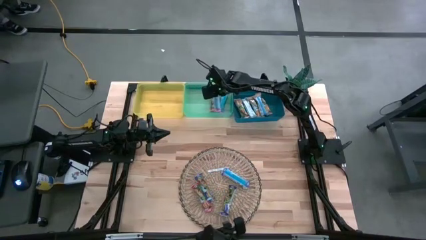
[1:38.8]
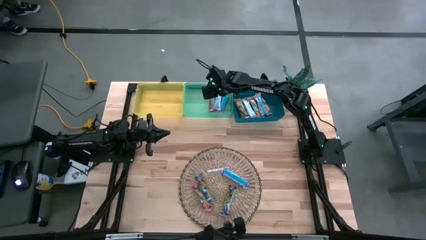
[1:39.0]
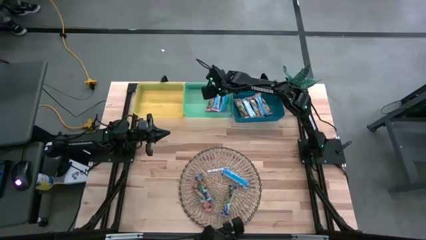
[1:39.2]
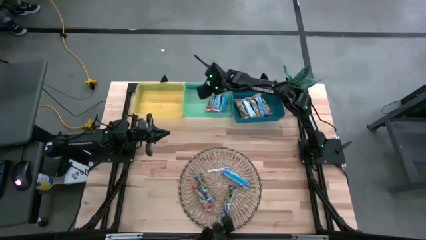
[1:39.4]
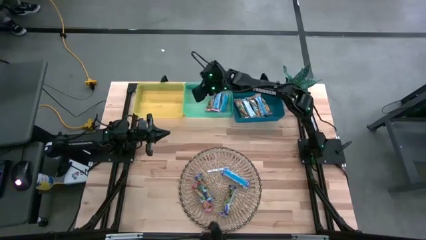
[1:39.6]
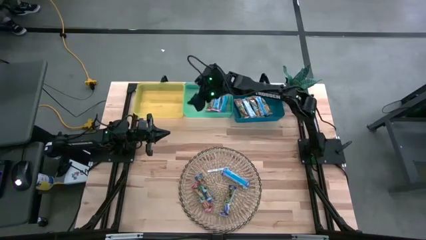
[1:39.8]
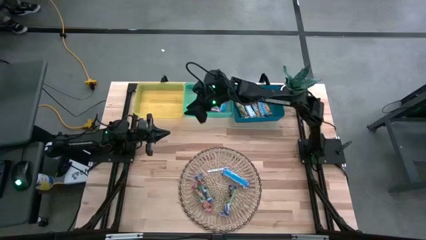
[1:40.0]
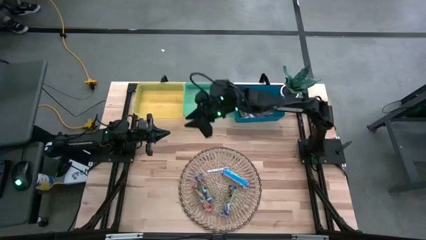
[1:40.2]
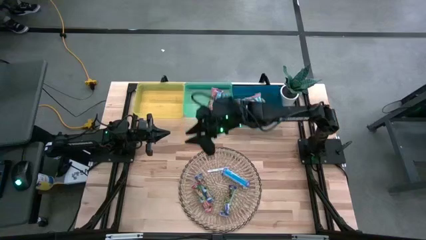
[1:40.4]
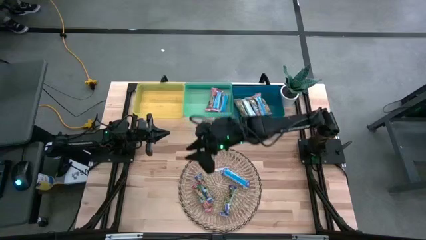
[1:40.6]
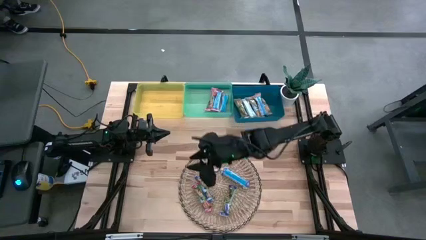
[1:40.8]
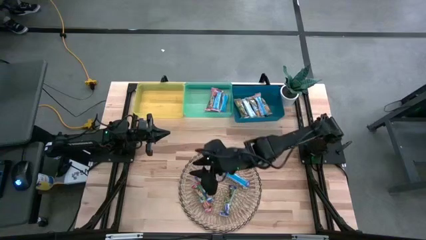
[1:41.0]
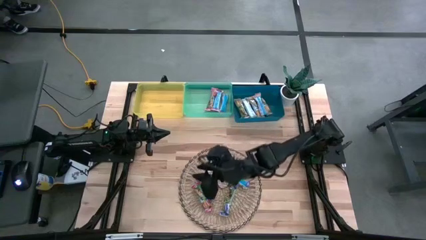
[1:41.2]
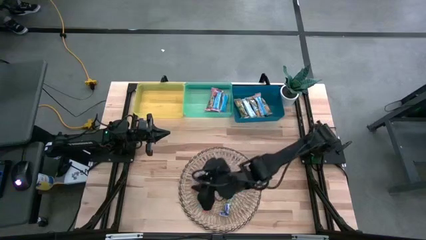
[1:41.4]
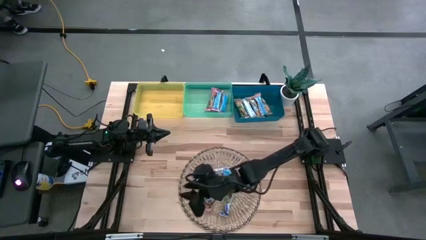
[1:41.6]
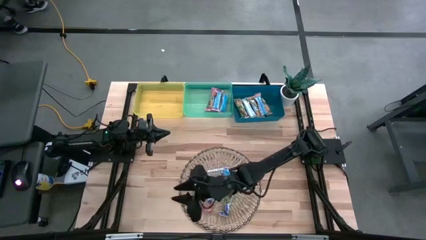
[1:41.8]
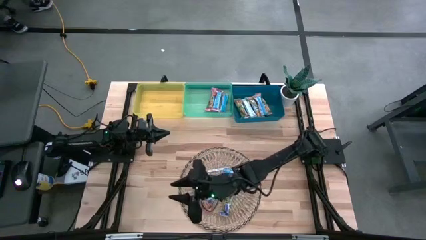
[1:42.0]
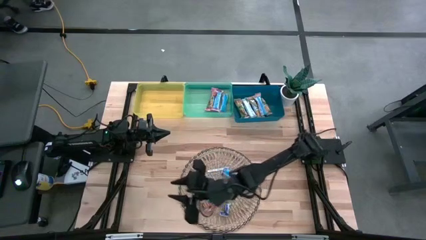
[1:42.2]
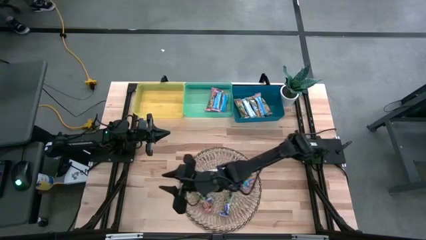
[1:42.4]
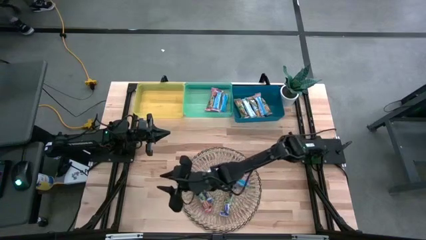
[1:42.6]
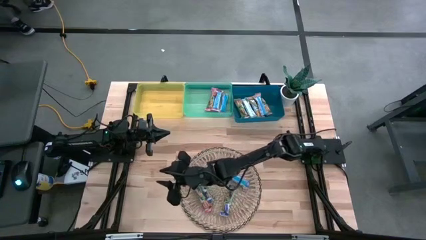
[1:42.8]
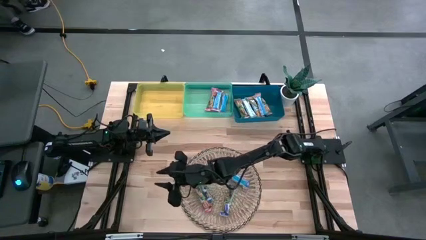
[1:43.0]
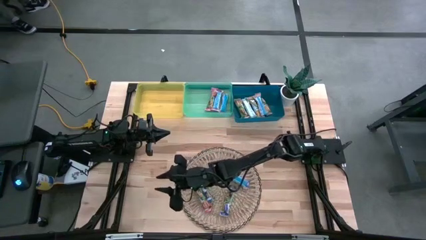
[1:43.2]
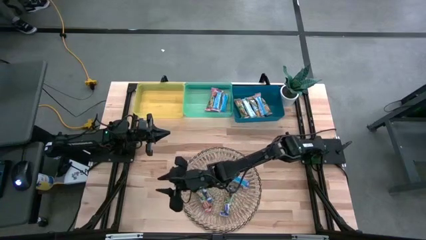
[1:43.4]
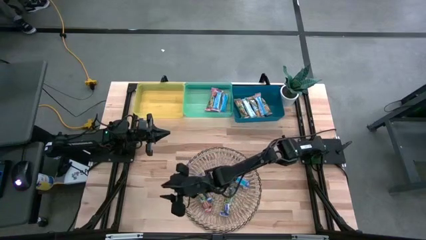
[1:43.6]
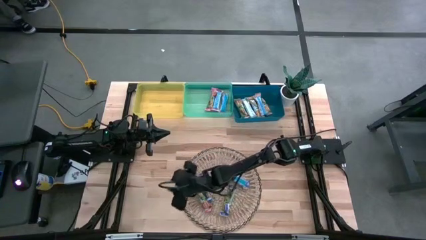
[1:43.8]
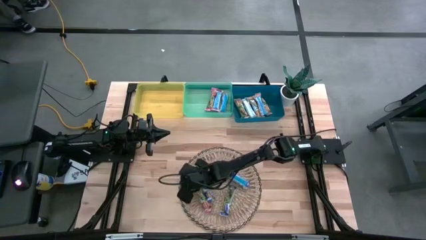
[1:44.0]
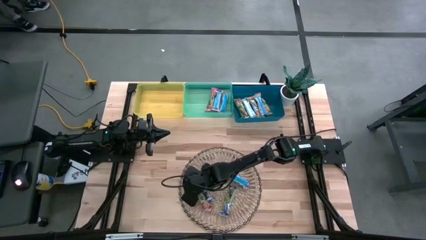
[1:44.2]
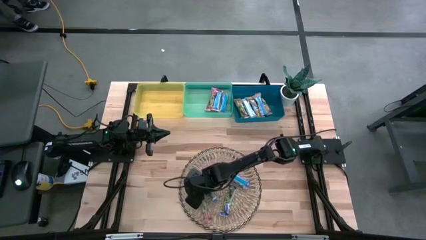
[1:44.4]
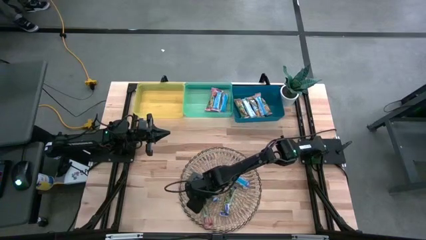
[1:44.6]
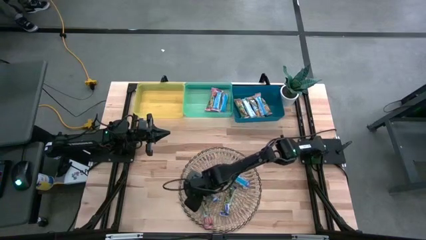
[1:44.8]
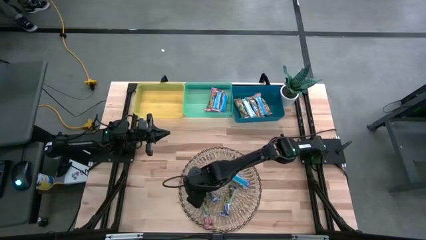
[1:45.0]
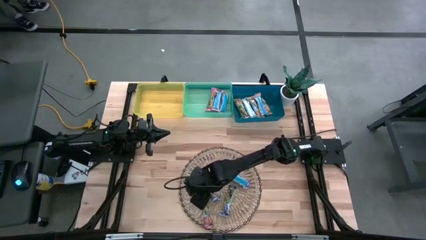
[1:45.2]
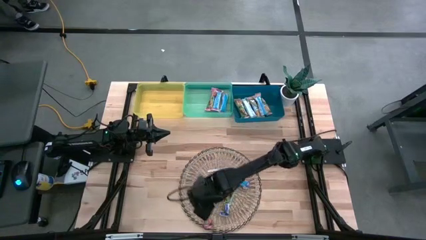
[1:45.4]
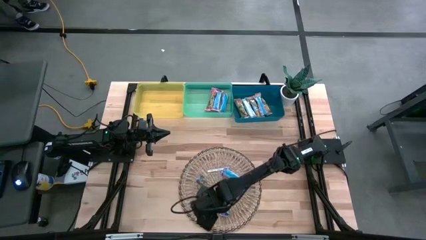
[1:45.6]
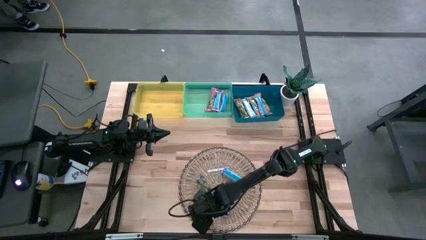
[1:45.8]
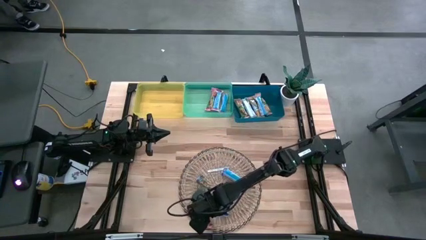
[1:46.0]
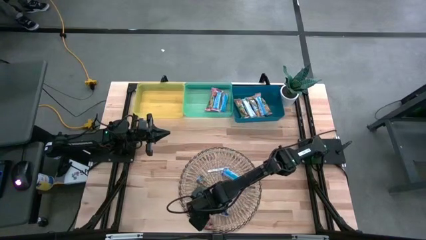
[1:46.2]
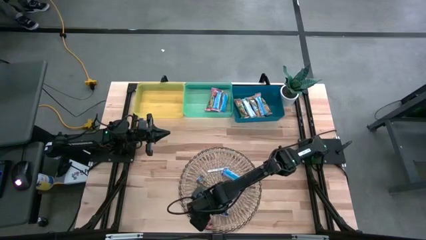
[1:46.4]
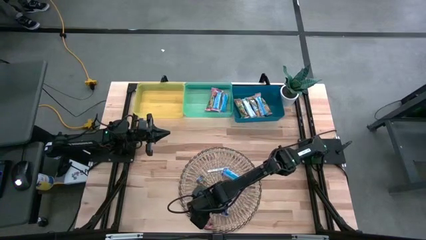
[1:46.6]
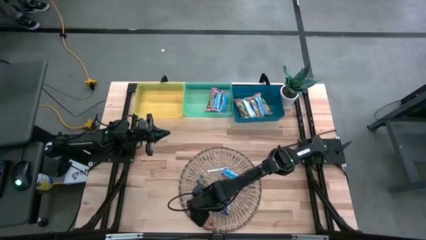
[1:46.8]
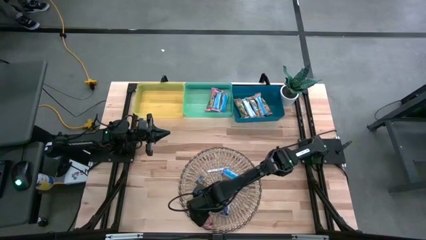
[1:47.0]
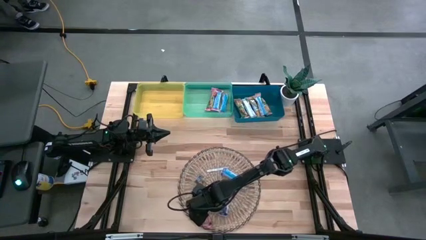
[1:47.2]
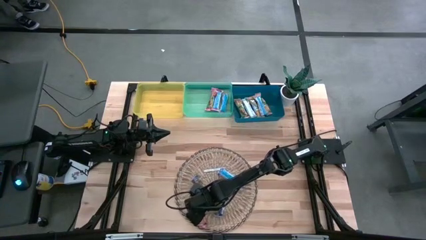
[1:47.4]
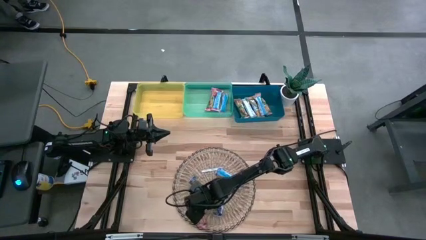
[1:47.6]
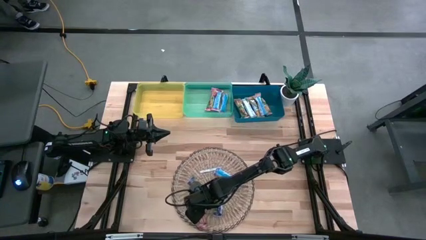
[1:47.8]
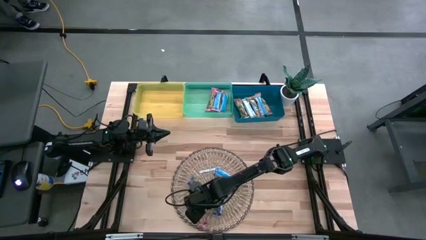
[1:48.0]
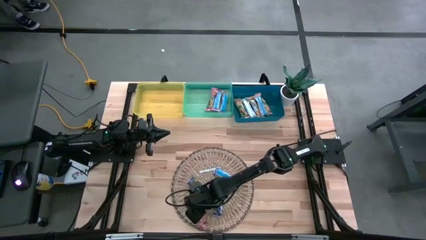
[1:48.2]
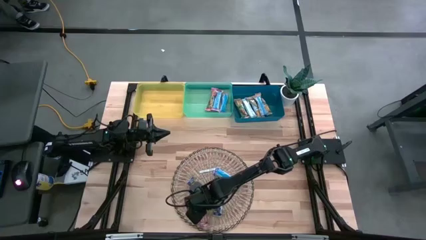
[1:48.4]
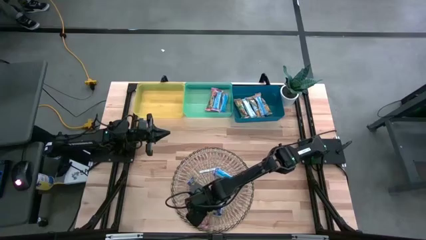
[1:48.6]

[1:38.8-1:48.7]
Task: Pick and place Granola Bars by type
Put the red granola bar into the light green bin

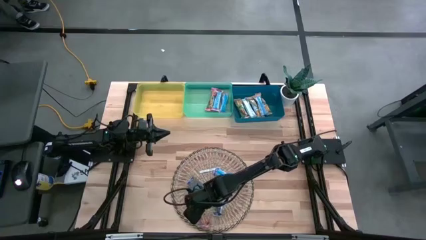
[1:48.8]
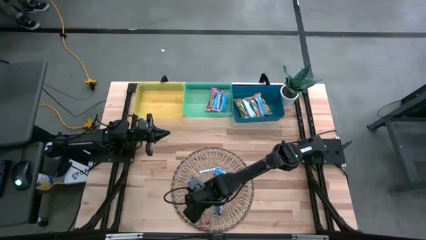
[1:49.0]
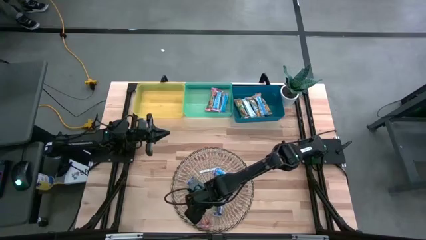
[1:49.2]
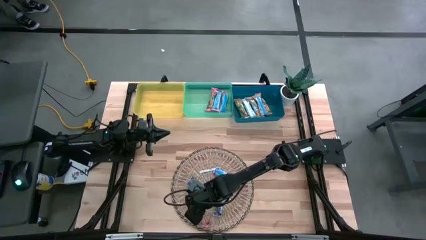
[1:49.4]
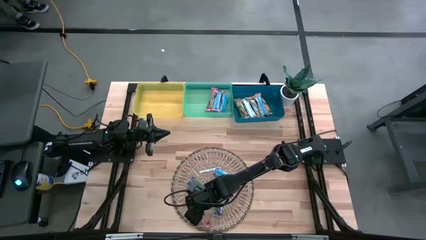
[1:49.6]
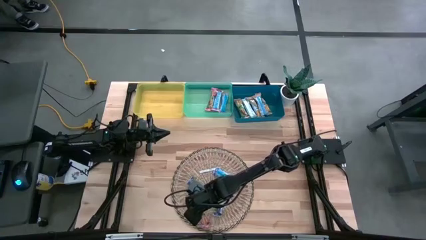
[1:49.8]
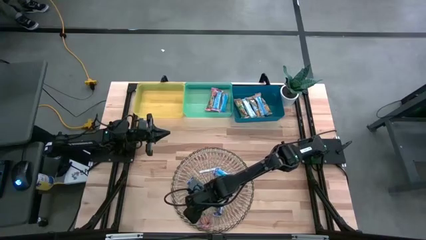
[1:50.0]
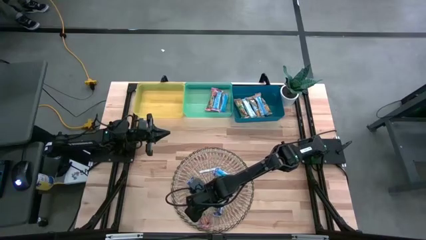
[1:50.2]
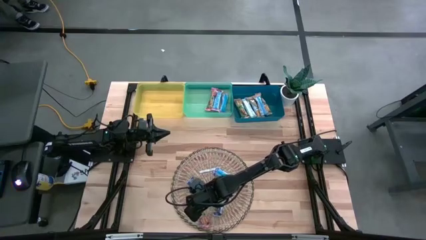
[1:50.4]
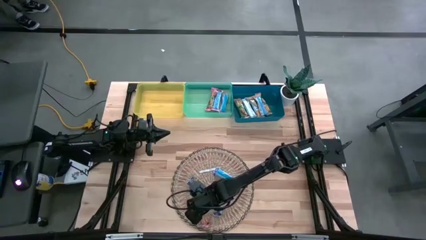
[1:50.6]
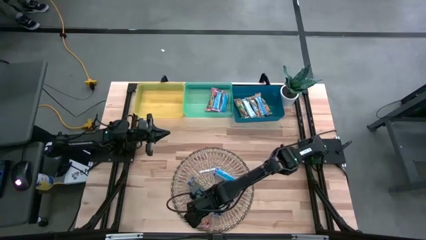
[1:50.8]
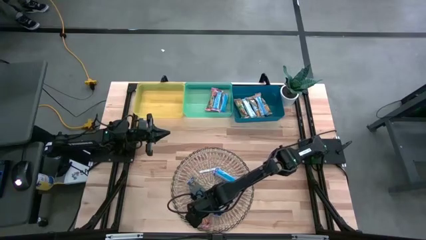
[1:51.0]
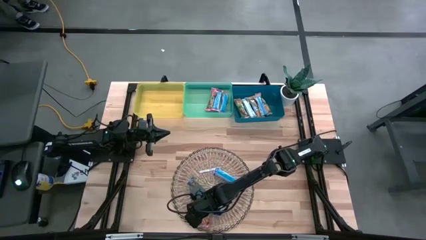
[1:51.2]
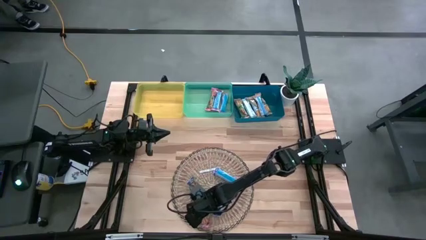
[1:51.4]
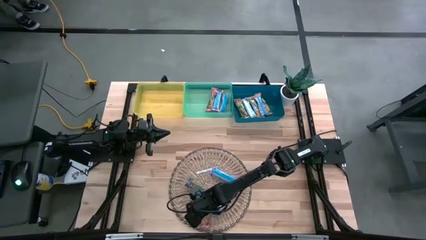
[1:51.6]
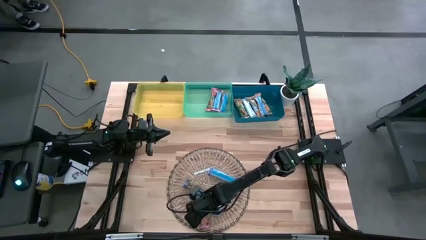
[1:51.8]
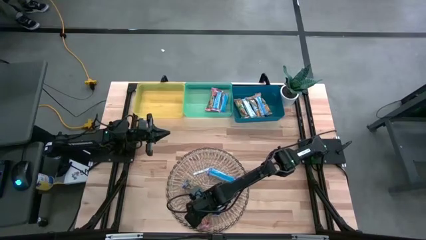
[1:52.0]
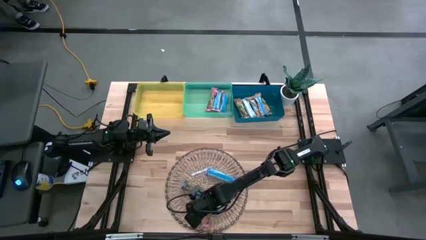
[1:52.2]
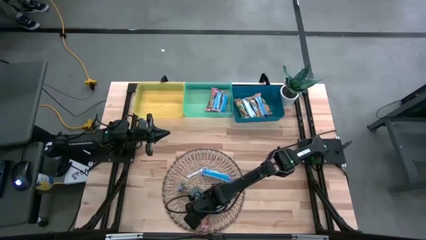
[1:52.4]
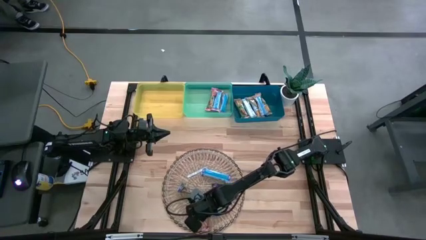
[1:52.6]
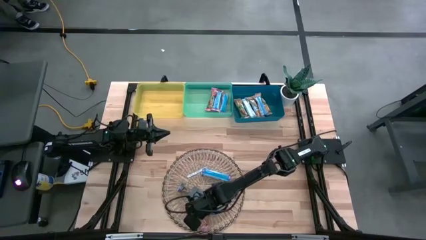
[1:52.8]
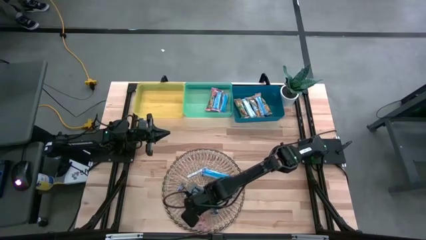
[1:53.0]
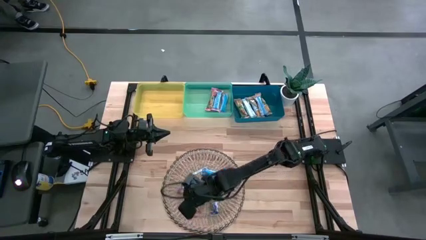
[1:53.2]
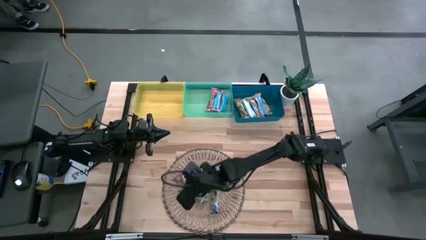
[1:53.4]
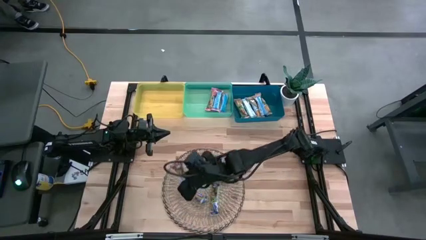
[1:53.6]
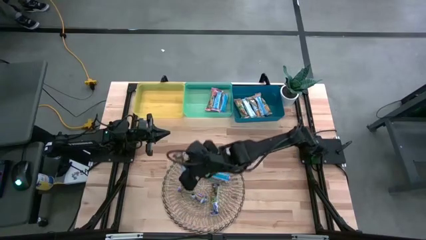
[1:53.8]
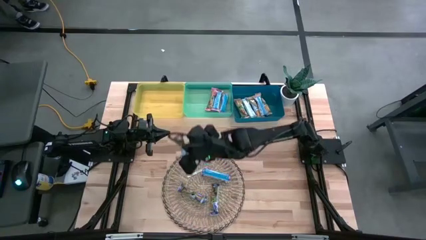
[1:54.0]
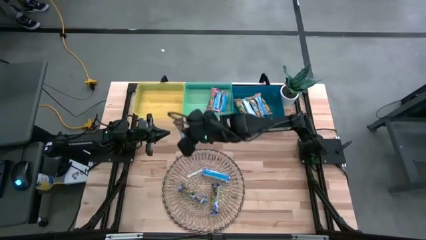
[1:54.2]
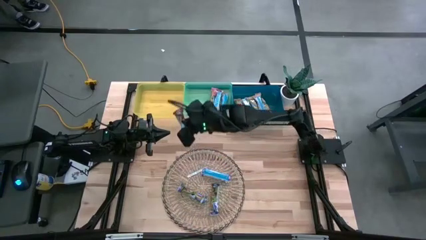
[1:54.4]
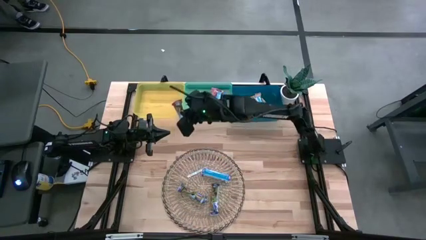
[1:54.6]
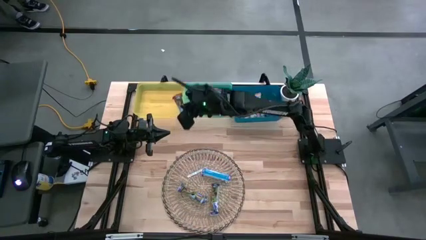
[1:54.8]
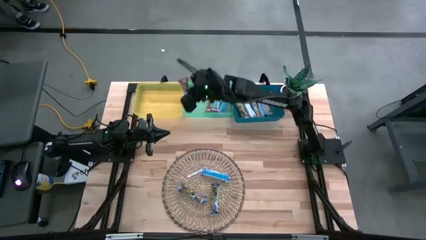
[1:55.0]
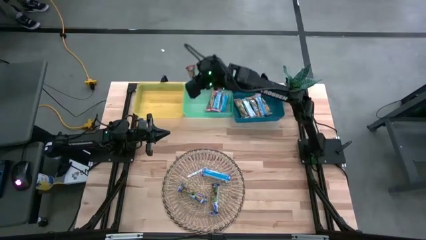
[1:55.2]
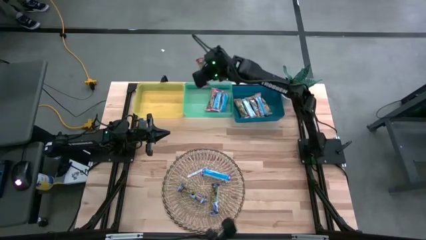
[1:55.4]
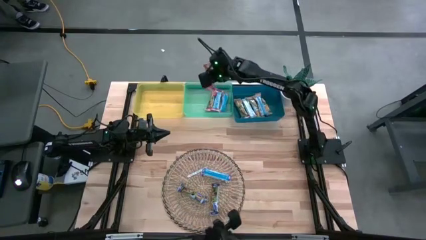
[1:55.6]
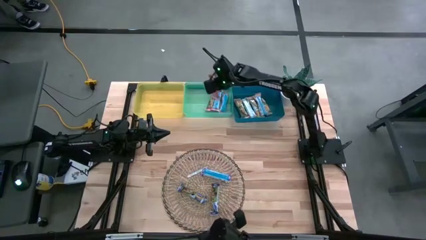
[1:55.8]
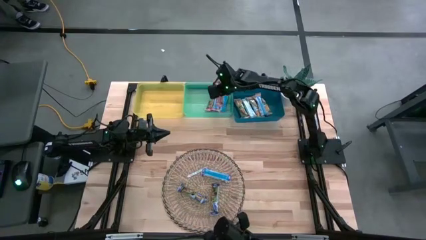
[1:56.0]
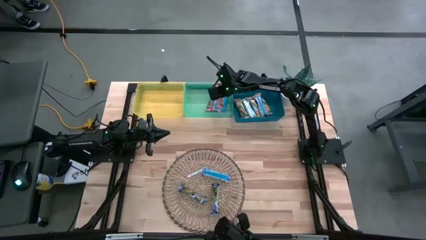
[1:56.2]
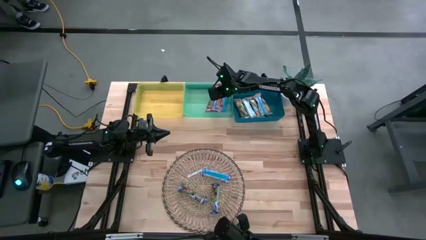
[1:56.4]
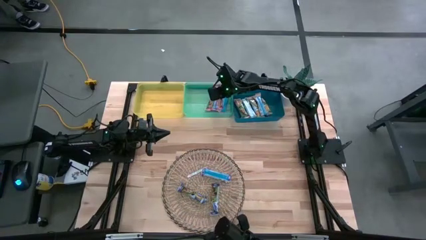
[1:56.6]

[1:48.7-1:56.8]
Put the red granola bar into the light green bin
